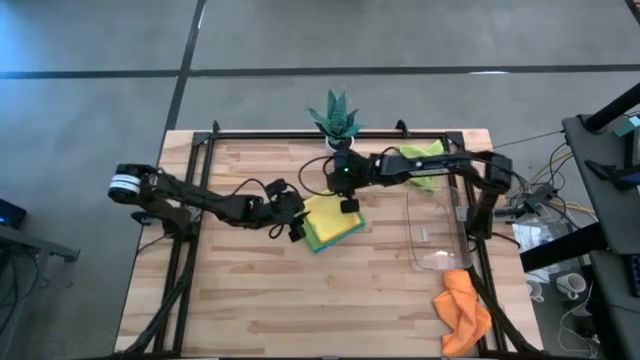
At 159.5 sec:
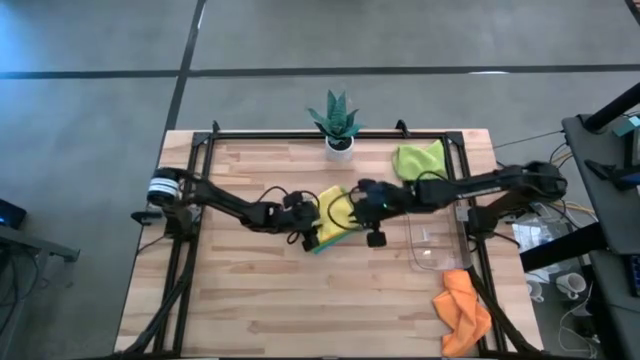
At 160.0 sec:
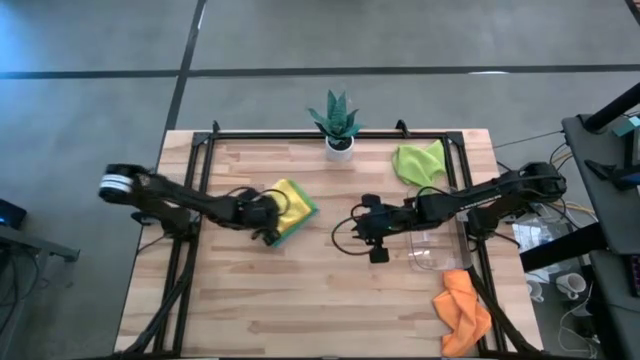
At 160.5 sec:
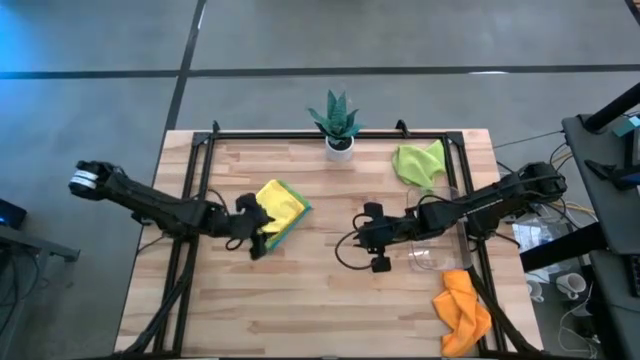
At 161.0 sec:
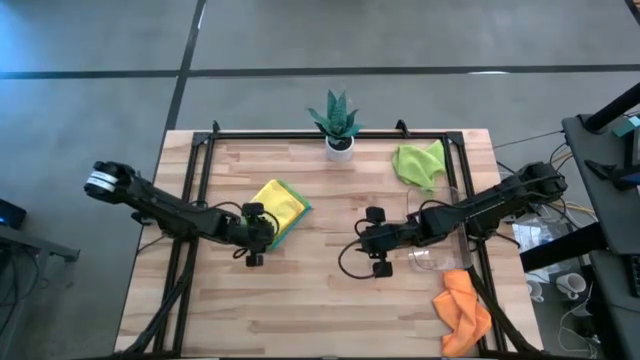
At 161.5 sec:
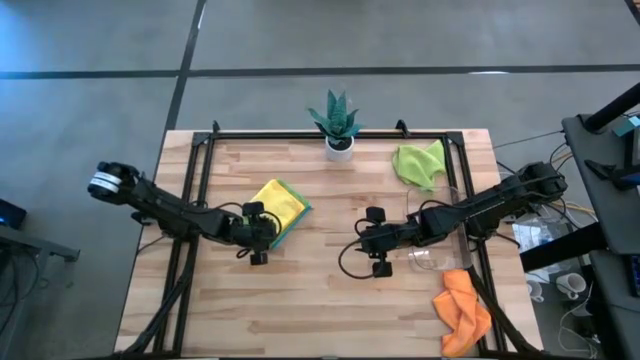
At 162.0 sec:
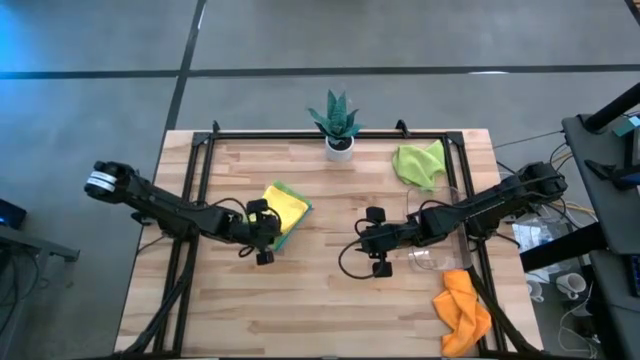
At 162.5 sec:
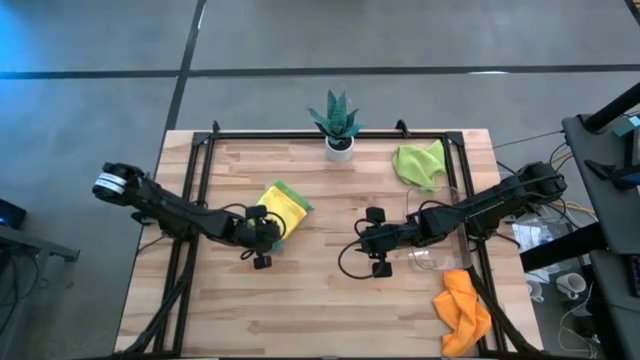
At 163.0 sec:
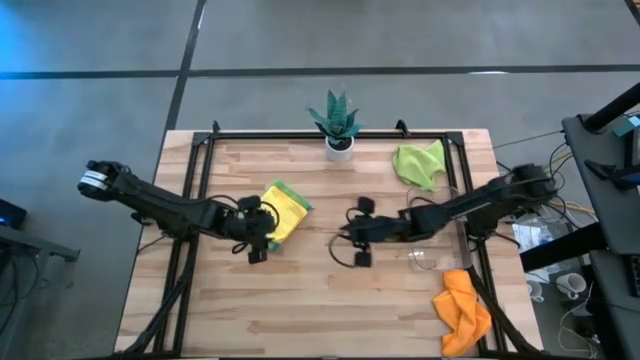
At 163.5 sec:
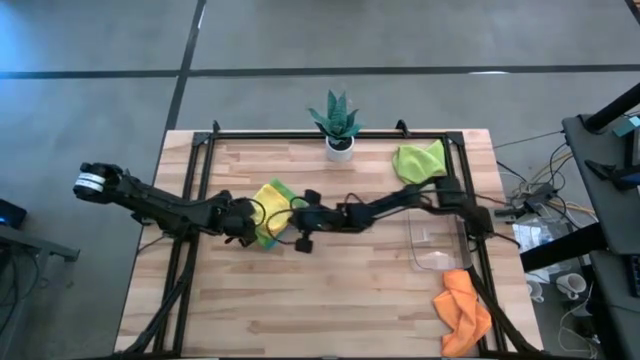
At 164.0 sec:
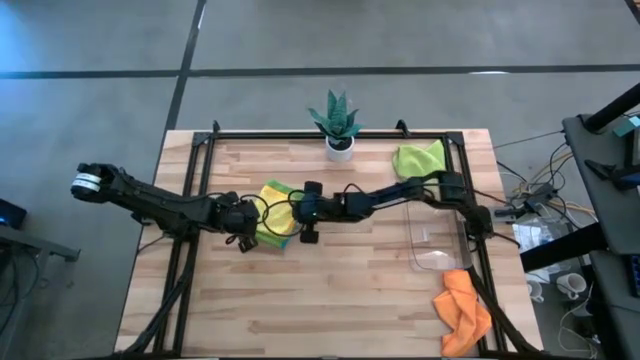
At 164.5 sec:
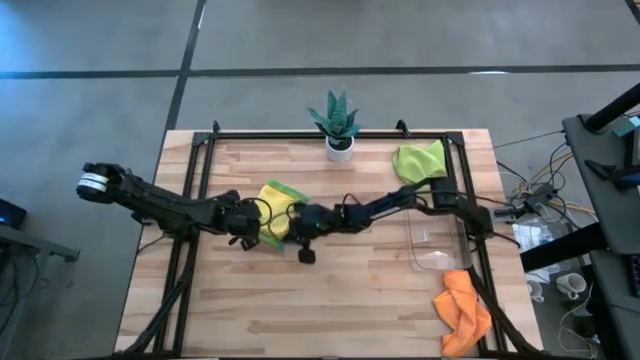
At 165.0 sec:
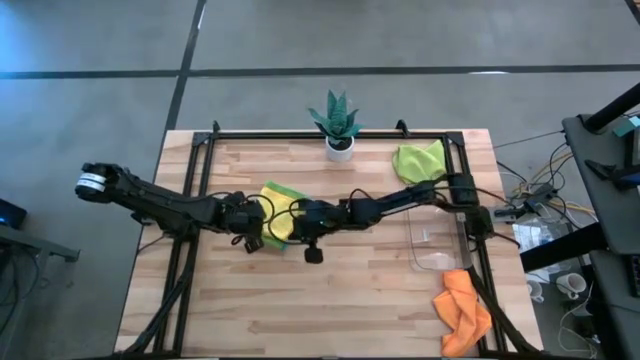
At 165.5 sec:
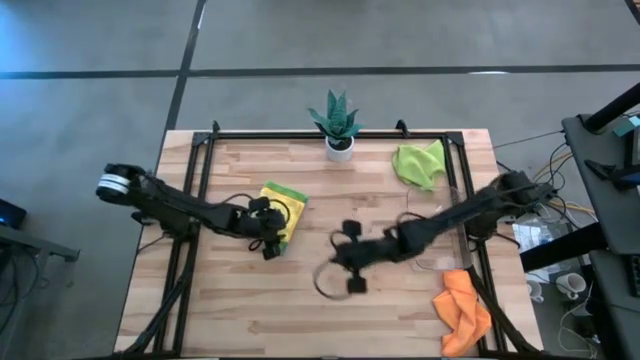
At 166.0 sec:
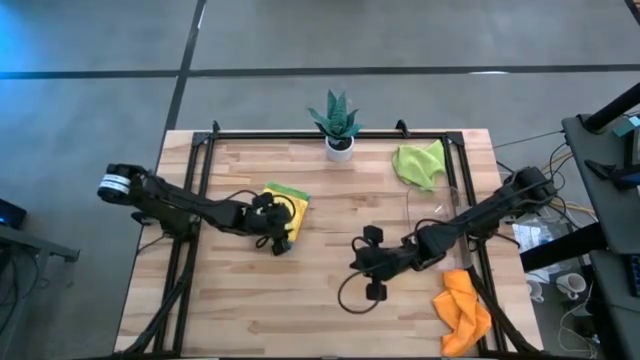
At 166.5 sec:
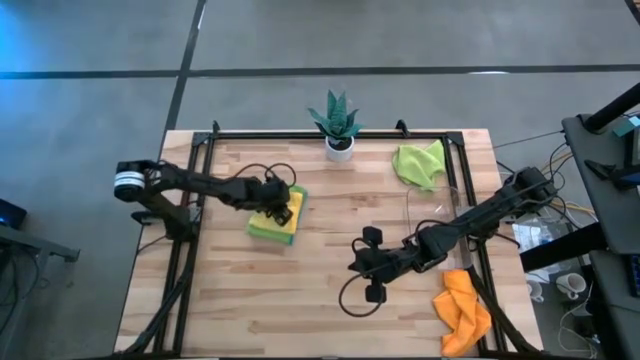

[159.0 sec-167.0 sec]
Task: Fold microfiber towels
Move the stacked towels to the upper left of the table

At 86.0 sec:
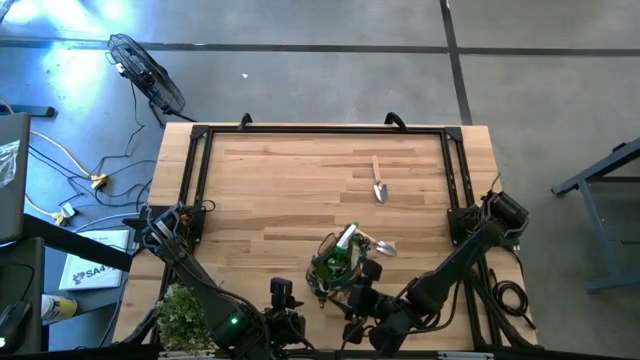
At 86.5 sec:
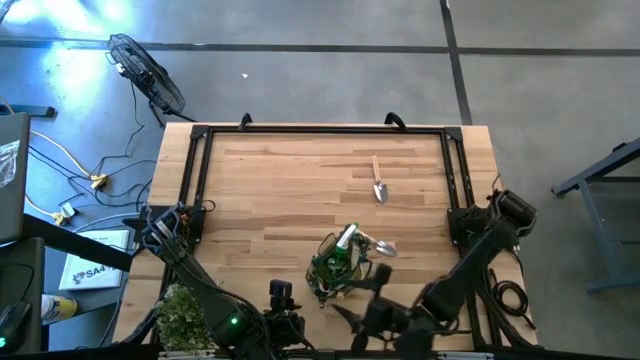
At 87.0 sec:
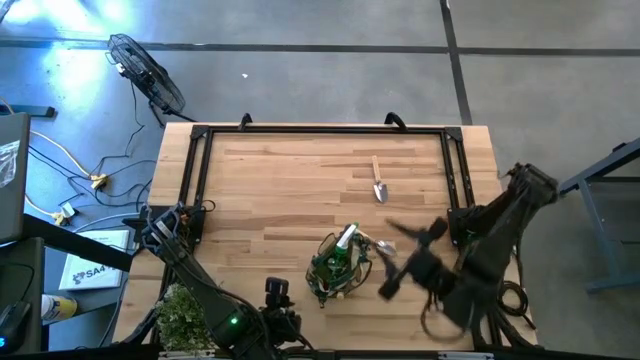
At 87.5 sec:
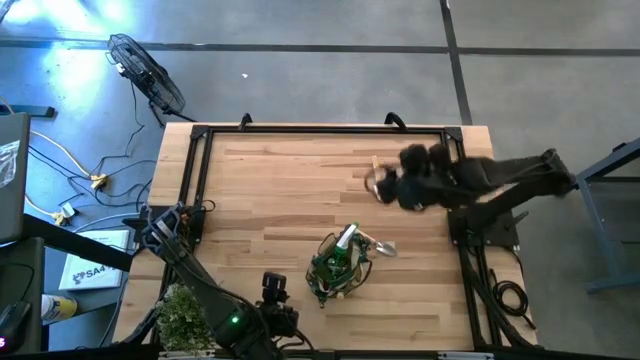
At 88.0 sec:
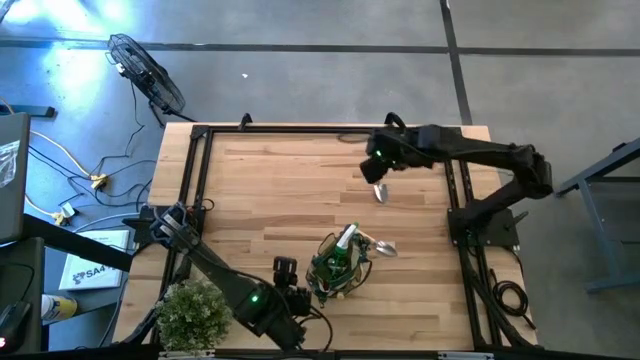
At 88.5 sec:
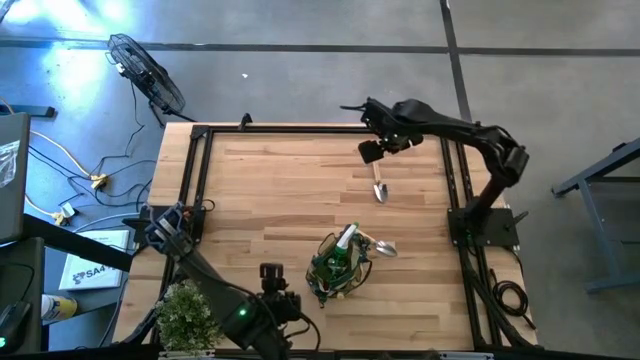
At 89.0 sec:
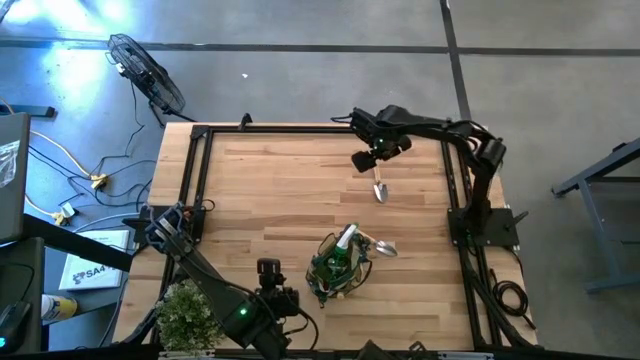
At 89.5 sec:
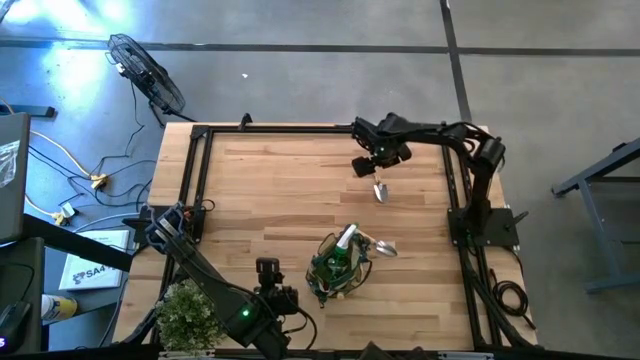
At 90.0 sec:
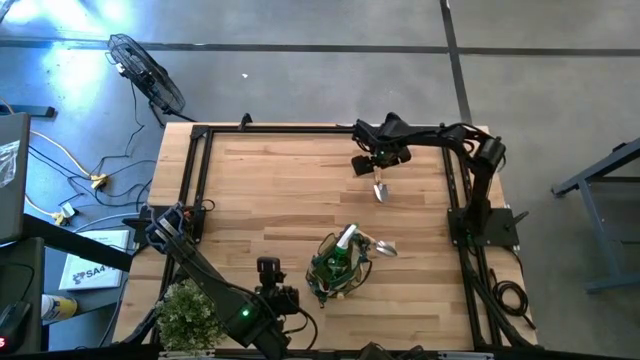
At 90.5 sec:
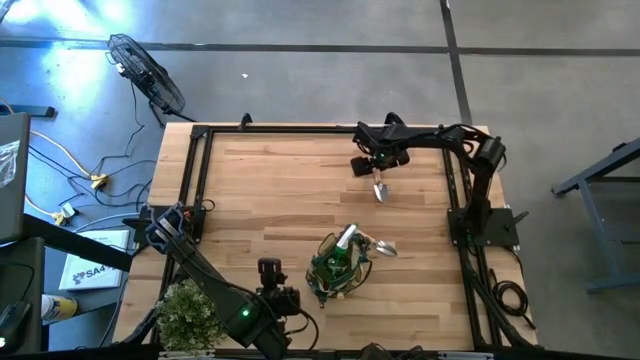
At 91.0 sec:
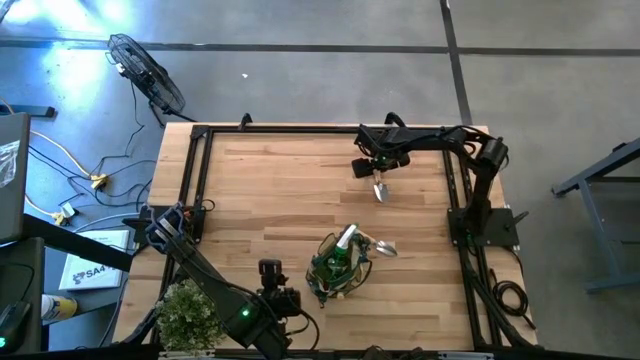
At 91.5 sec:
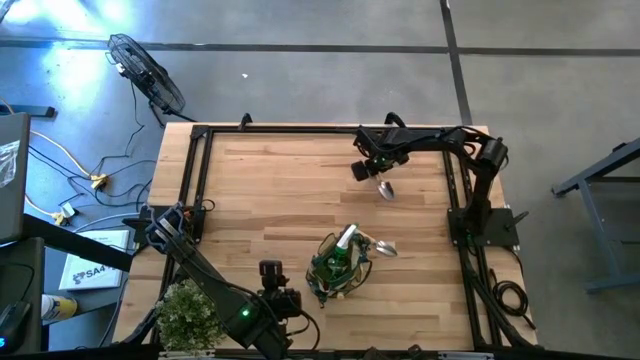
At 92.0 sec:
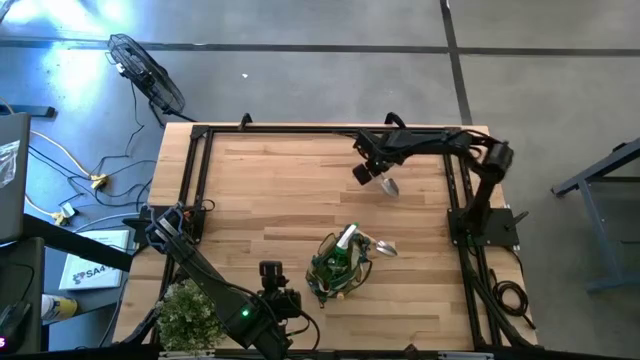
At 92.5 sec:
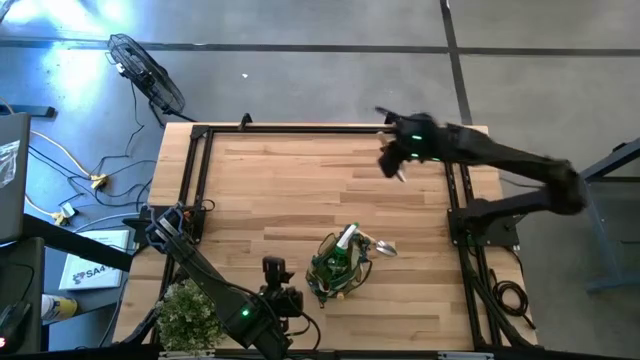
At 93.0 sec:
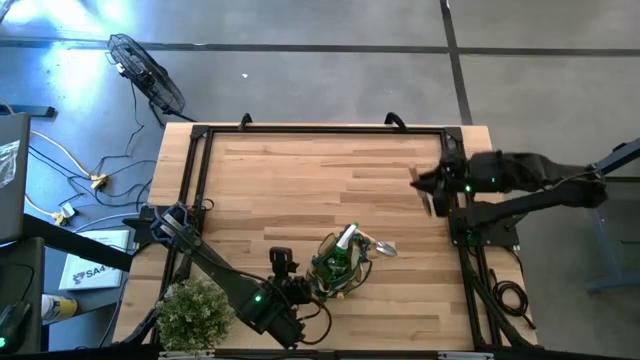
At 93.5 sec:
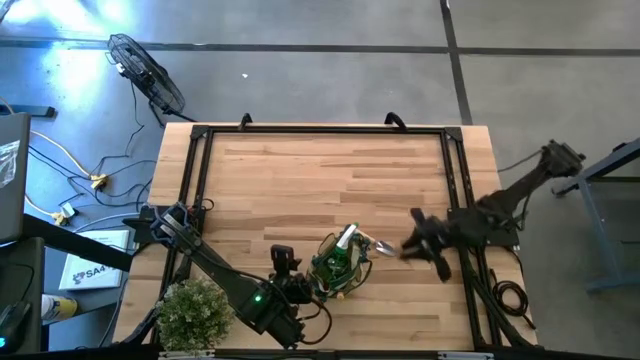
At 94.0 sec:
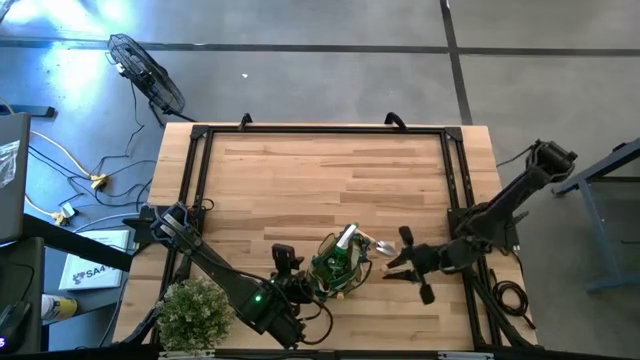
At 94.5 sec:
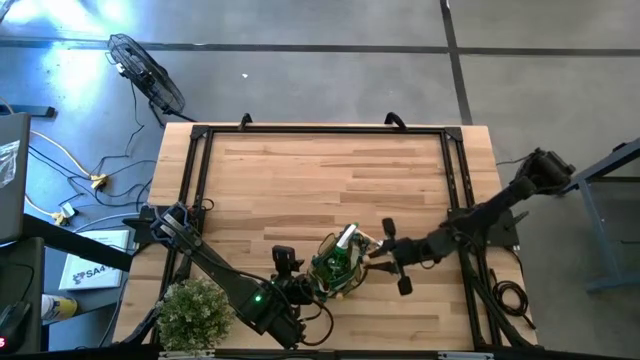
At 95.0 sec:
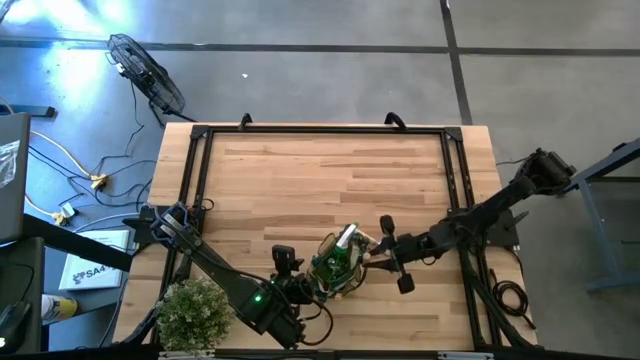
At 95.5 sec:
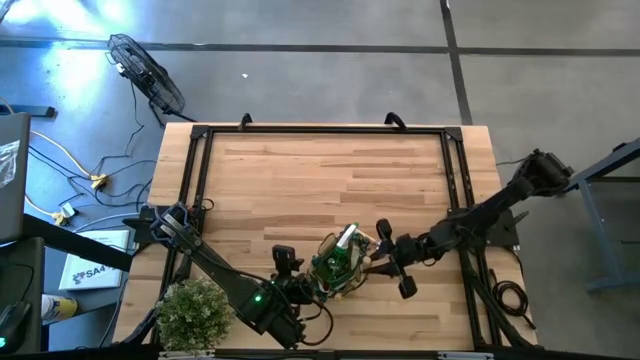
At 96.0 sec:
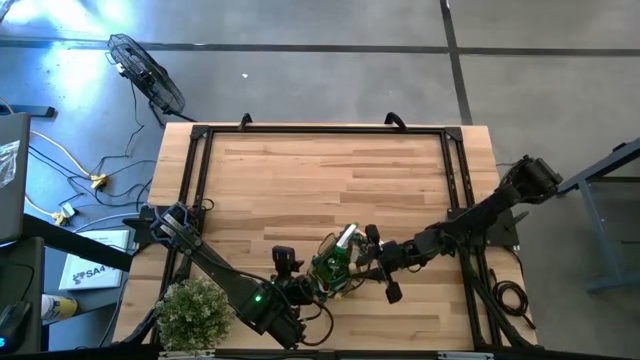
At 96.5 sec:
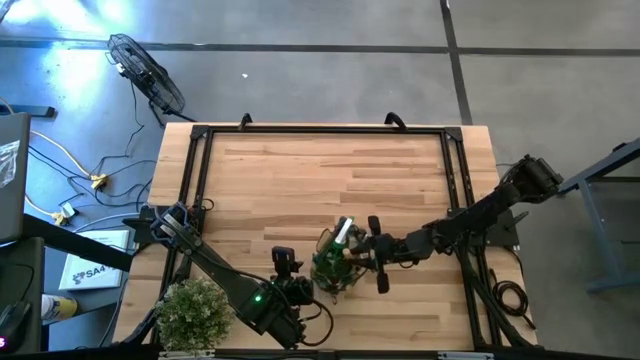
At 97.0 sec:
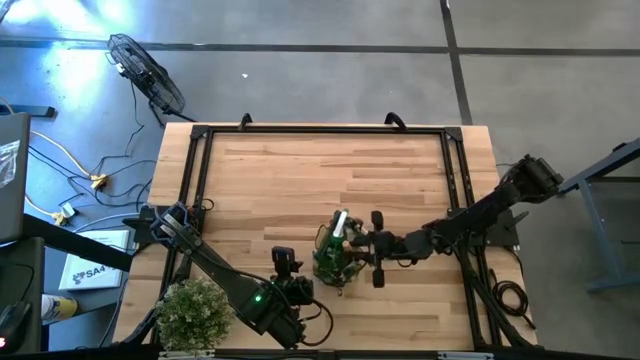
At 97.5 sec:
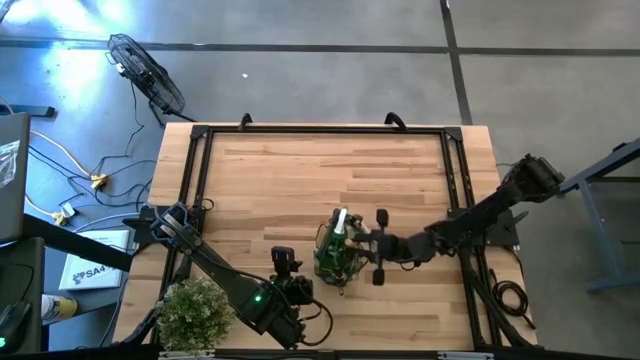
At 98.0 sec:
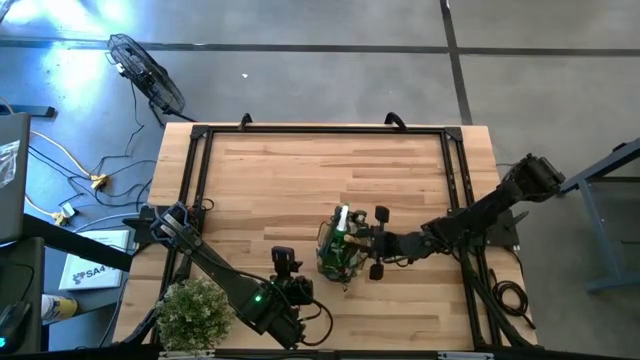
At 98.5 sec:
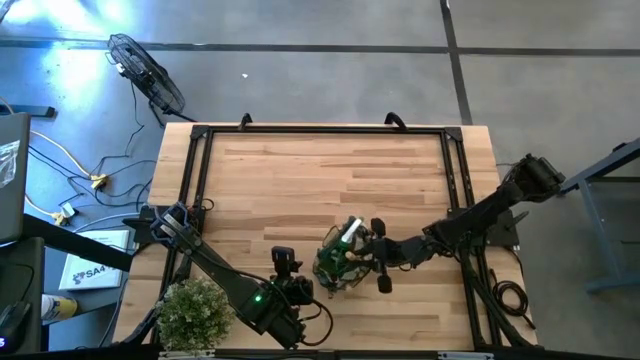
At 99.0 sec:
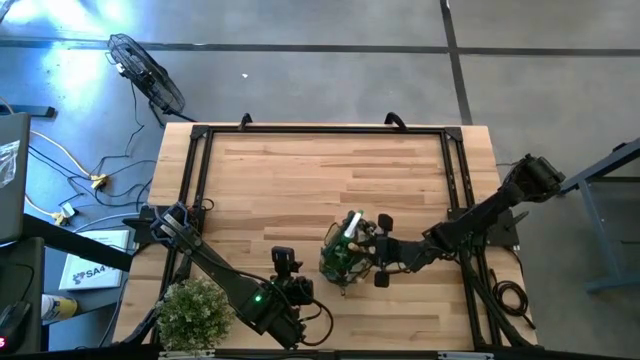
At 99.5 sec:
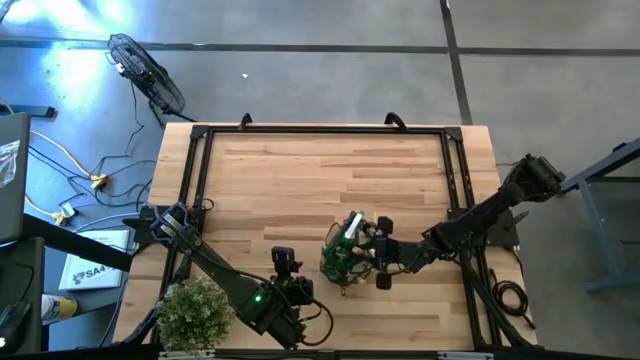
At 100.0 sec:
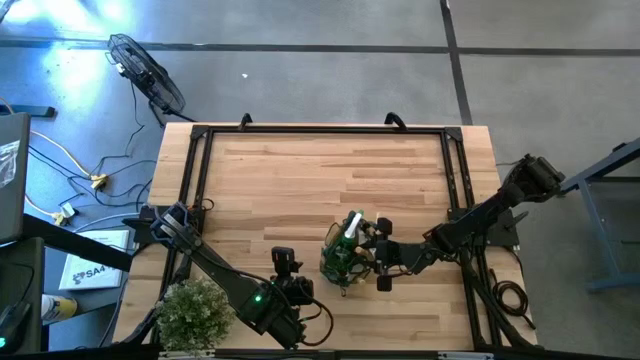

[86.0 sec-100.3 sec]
Task: Pick & Place Garden tools in Gardening bag
Put the top trowel into the gardening bag
